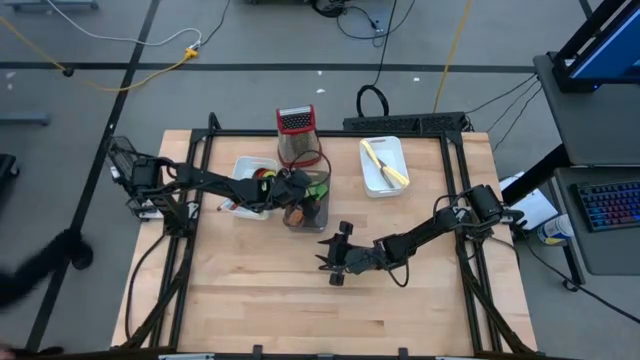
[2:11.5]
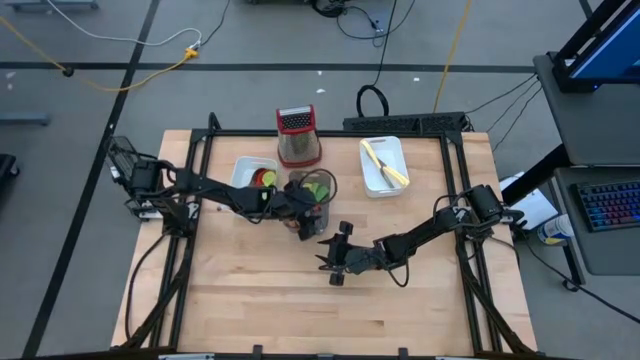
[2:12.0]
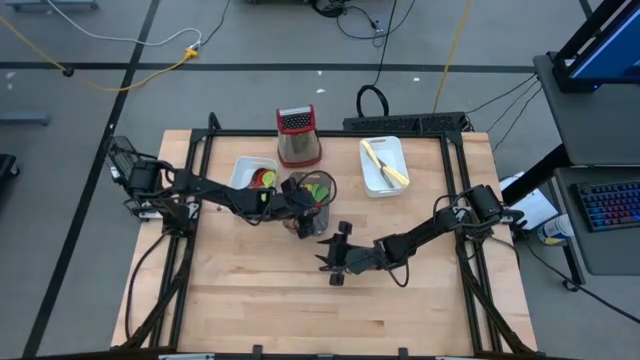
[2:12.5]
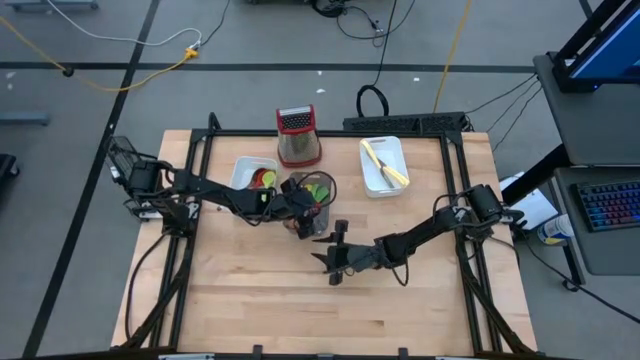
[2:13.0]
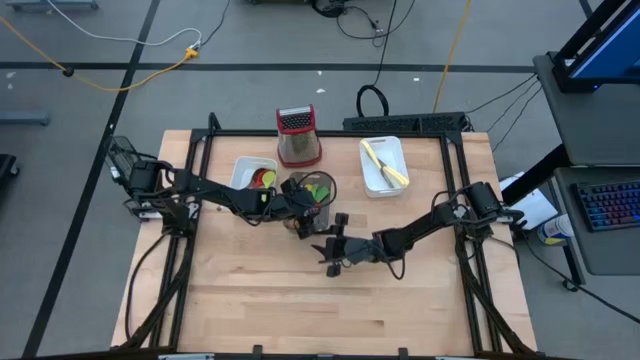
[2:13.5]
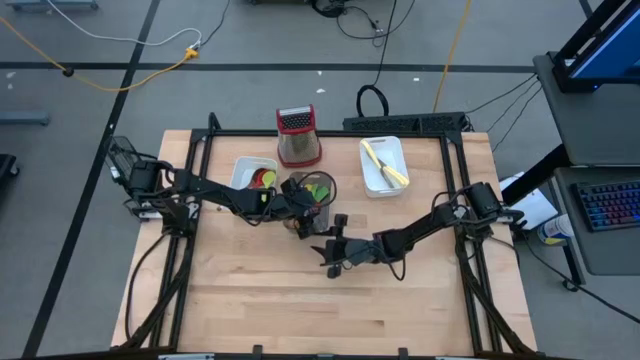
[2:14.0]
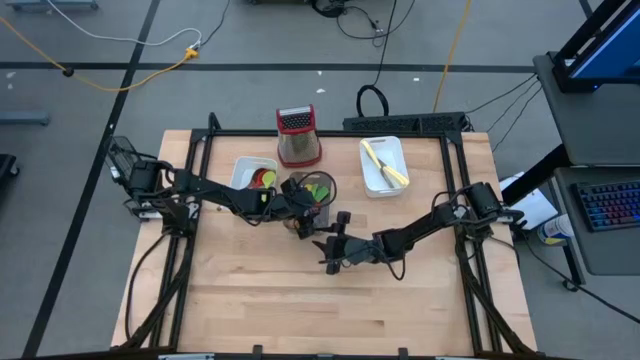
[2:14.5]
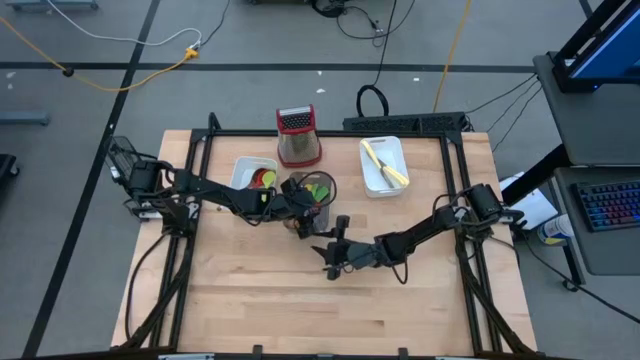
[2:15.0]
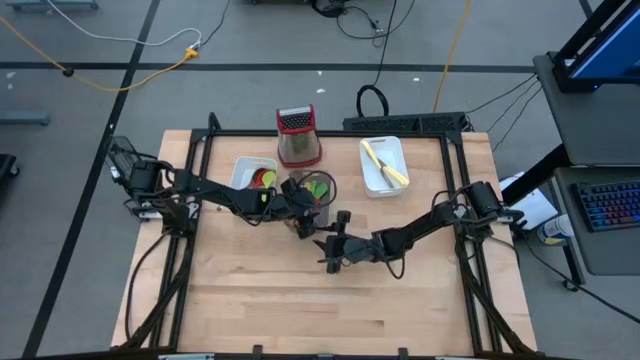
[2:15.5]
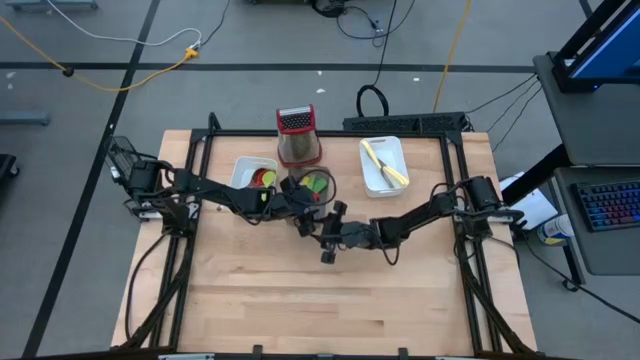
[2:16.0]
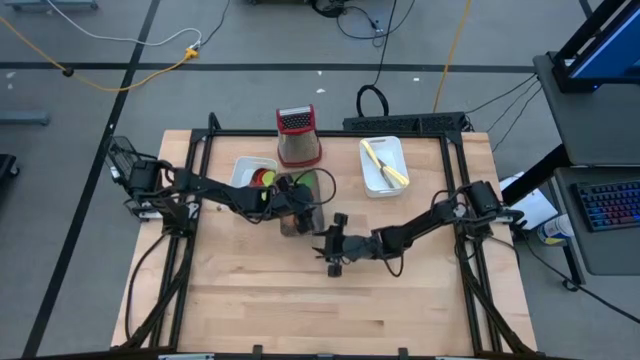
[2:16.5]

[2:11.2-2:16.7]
Task: Pick & Place Kitchen Items
Adjust the red spatula in the black bin

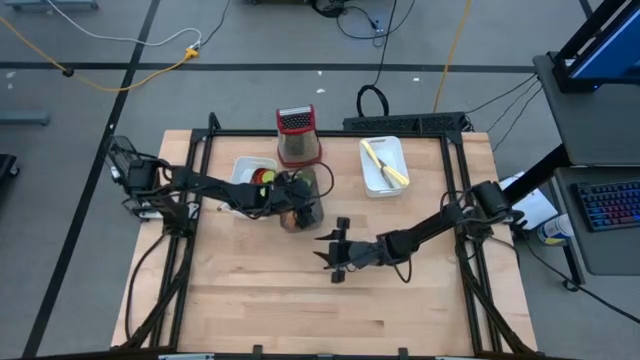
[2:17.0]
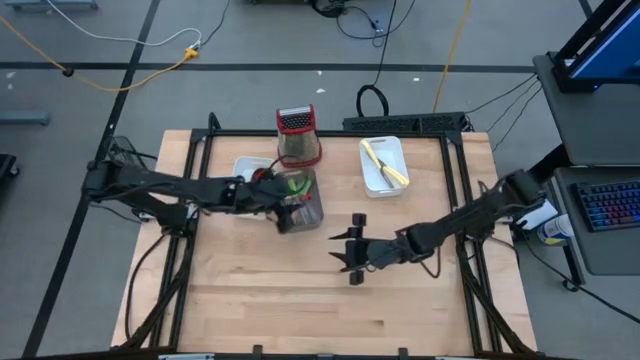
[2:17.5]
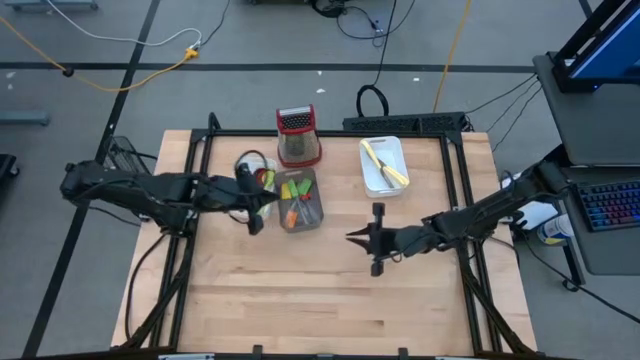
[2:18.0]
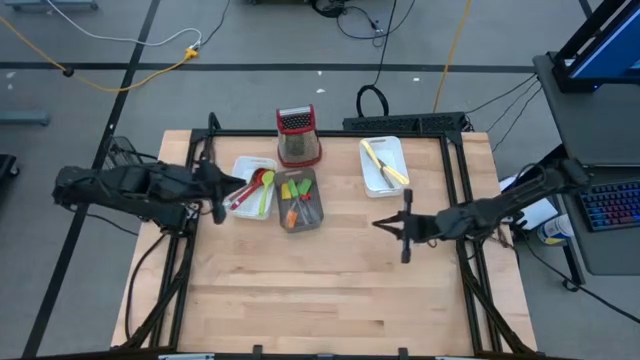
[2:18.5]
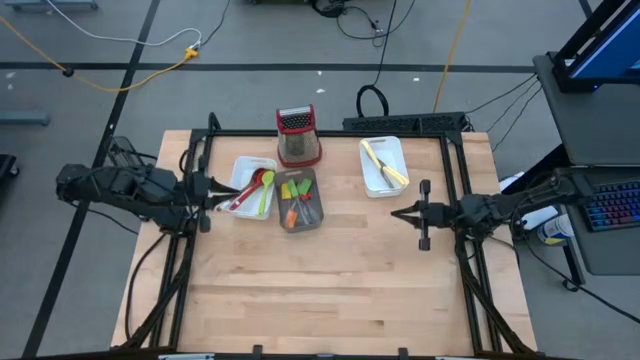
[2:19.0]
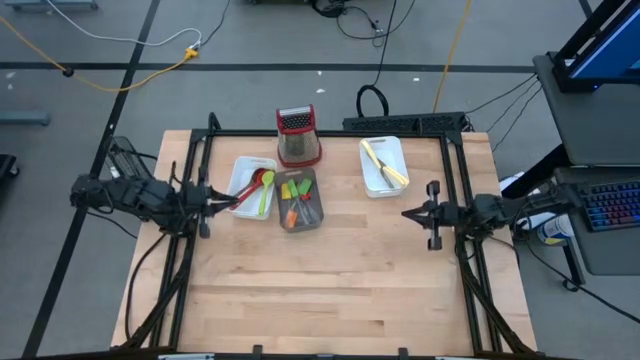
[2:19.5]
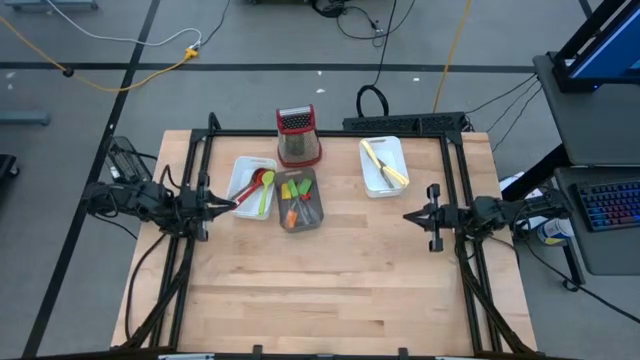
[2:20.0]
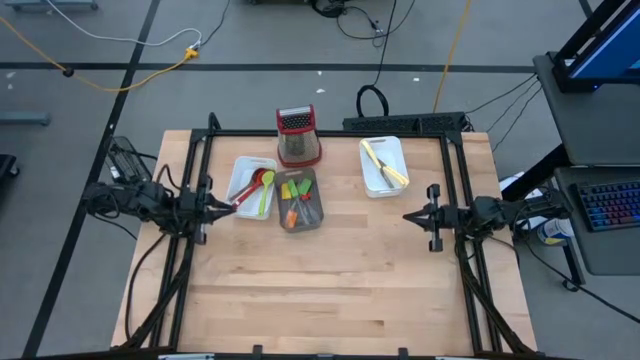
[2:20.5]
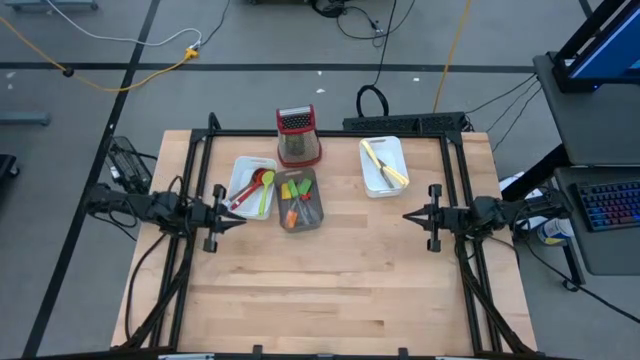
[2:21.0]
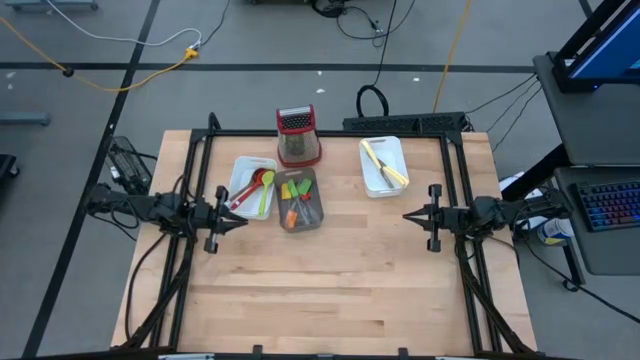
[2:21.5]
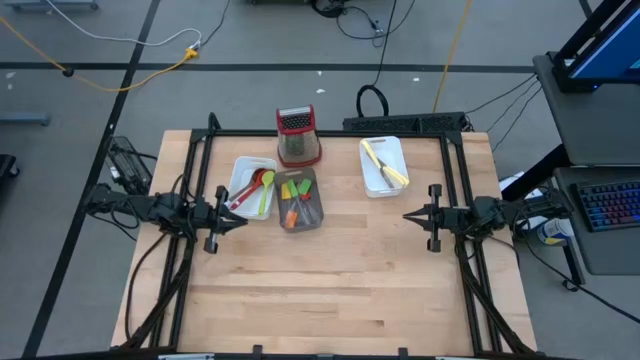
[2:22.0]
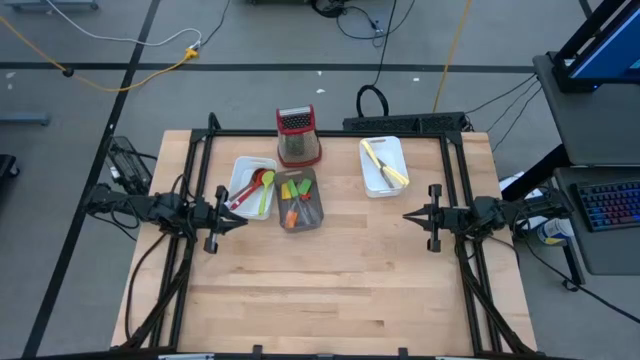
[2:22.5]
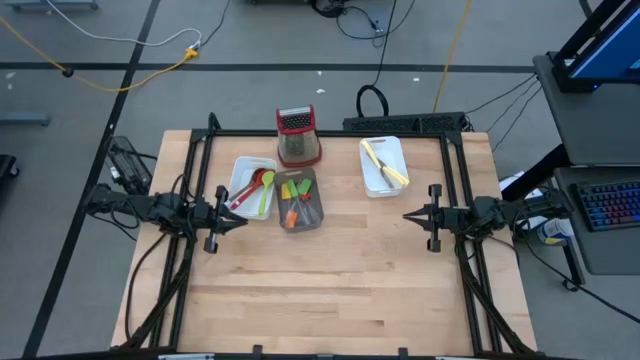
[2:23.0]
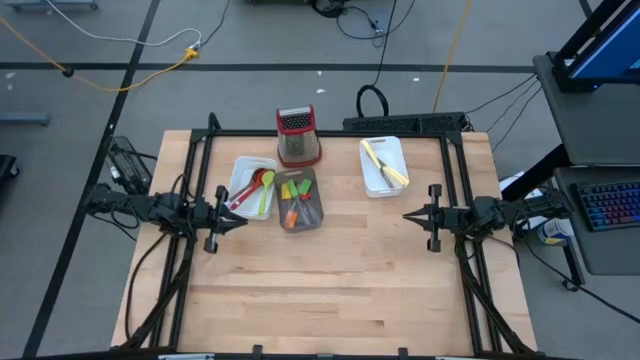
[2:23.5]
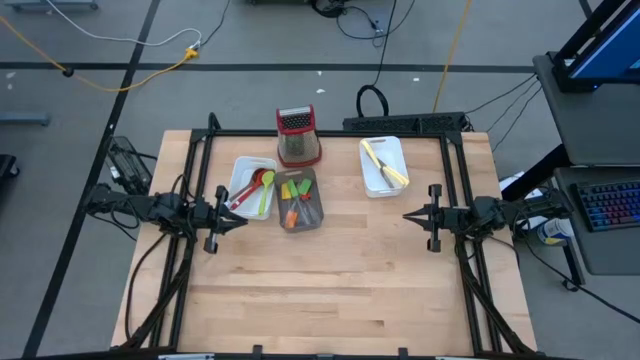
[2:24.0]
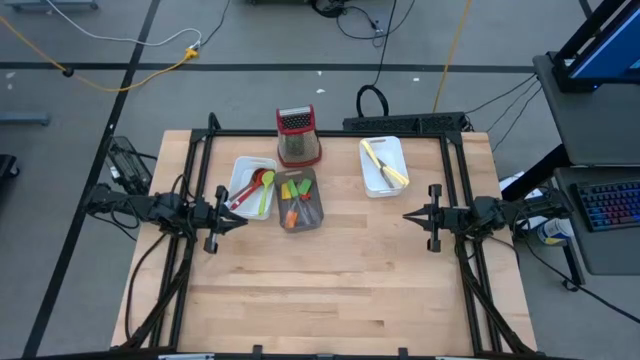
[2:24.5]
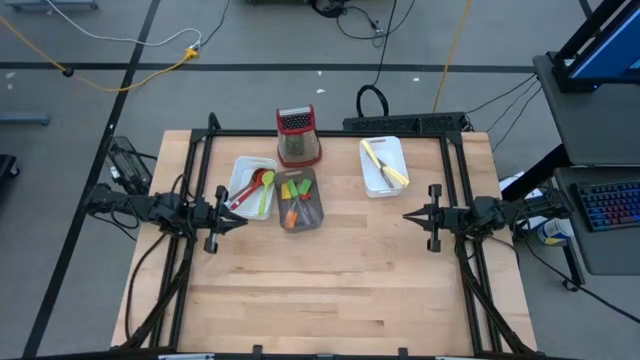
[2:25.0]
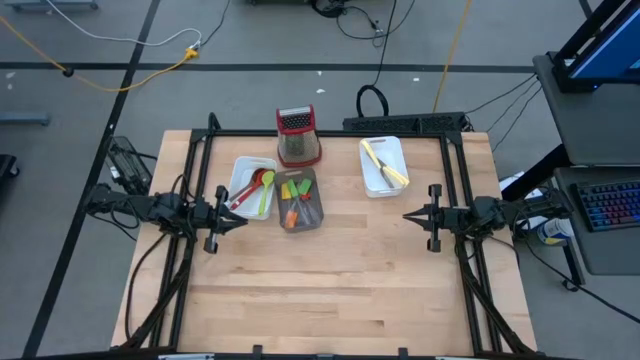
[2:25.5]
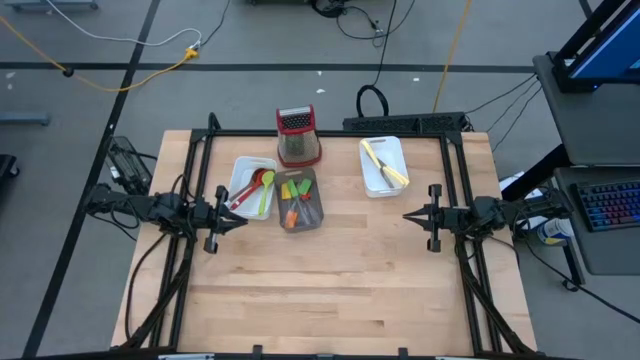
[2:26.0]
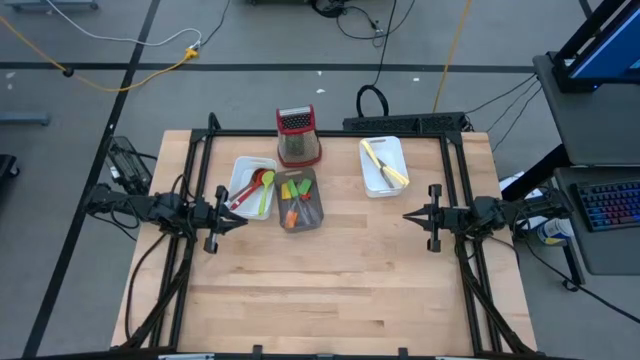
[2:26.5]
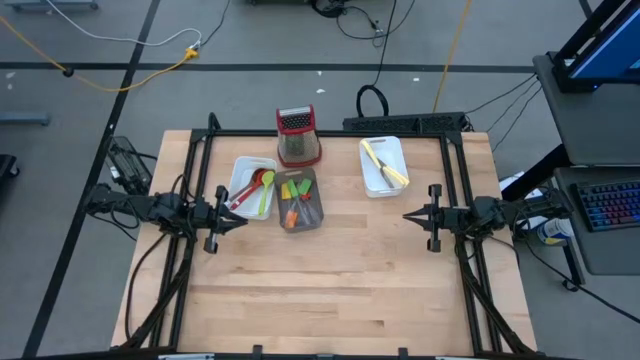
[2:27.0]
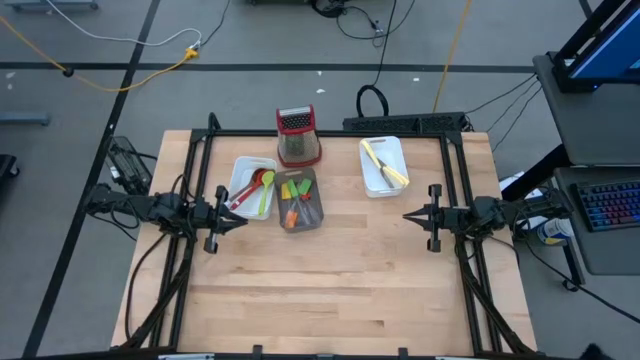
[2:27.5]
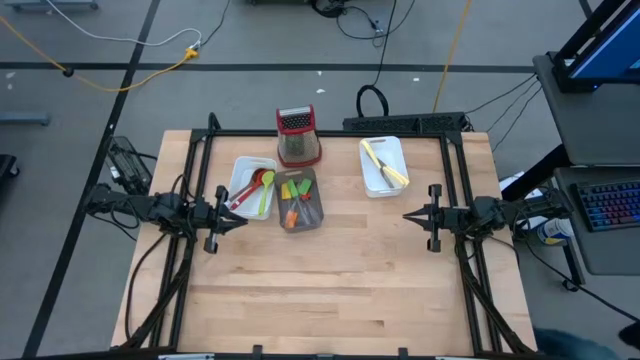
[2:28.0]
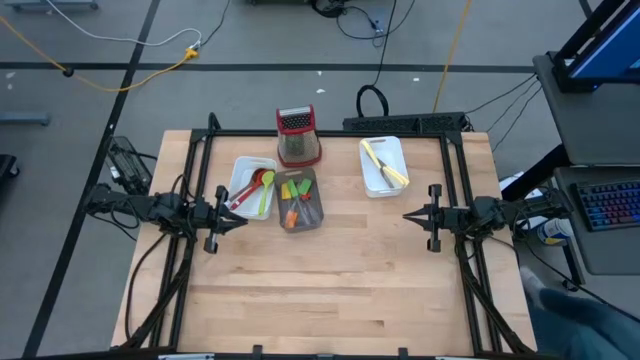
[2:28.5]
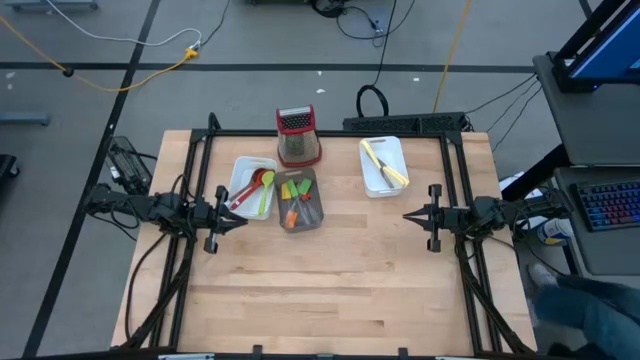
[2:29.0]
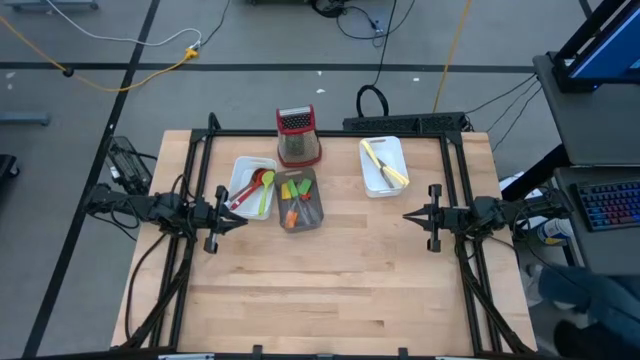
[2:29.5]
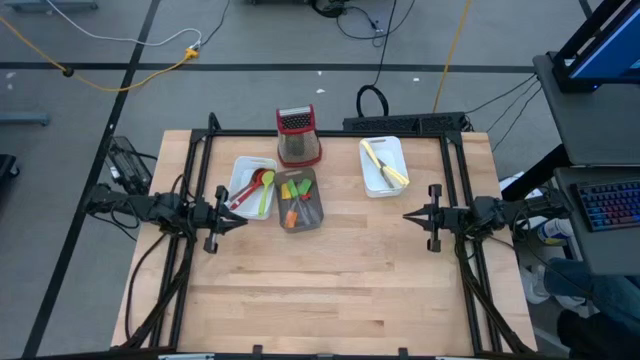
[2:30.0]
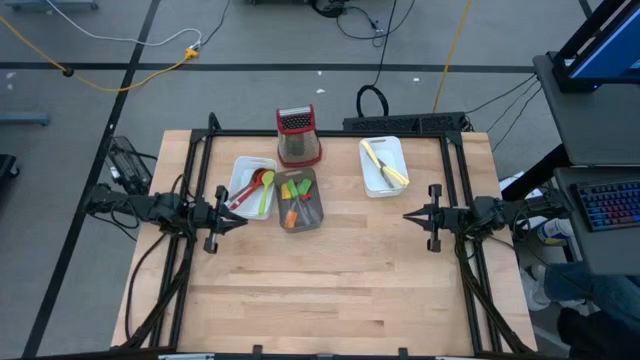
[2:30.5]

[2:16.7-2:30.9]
Return to Home Position
